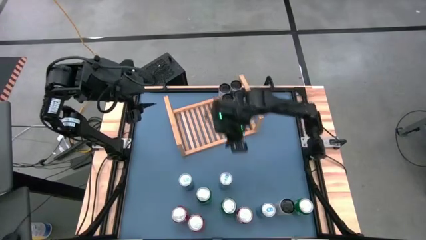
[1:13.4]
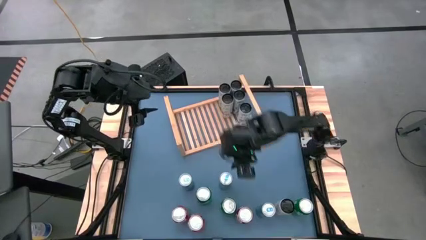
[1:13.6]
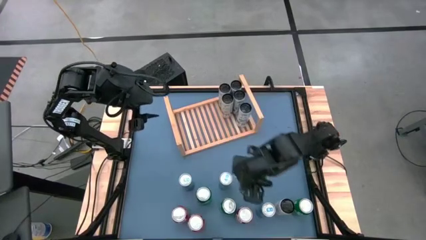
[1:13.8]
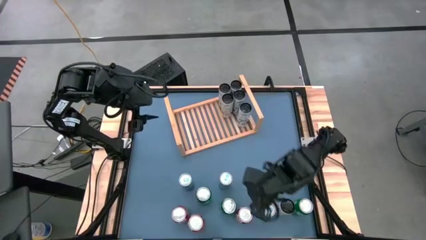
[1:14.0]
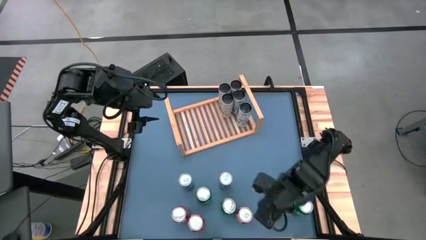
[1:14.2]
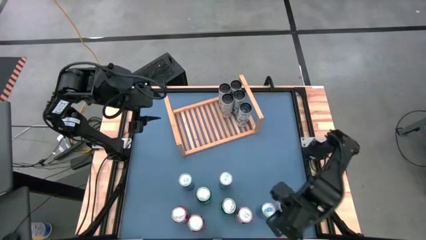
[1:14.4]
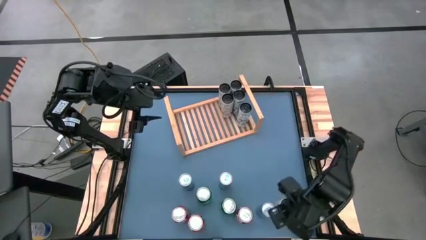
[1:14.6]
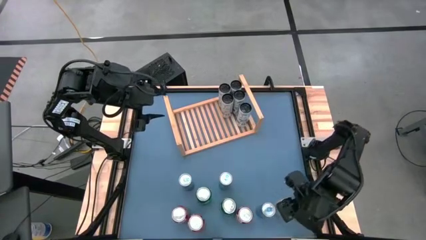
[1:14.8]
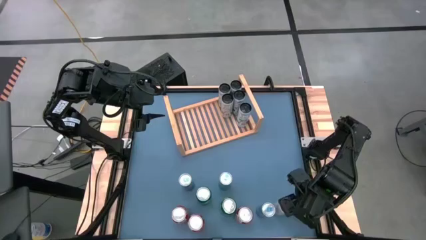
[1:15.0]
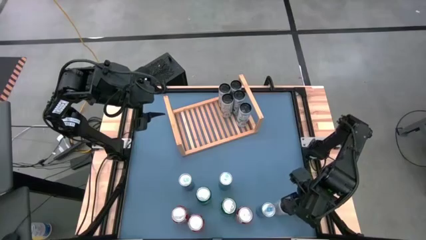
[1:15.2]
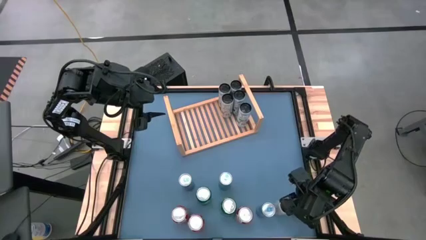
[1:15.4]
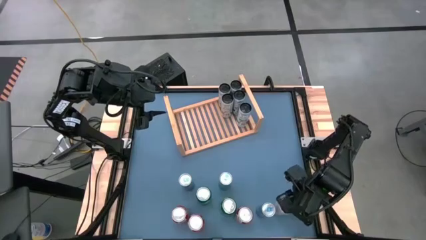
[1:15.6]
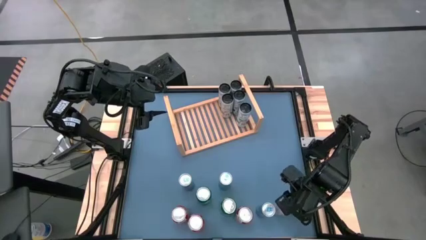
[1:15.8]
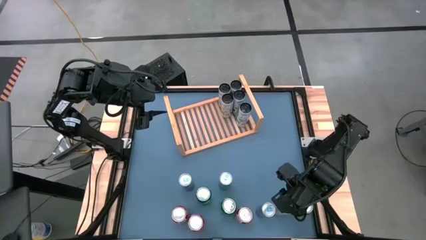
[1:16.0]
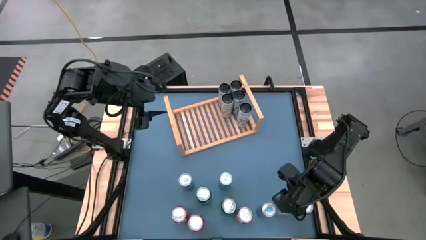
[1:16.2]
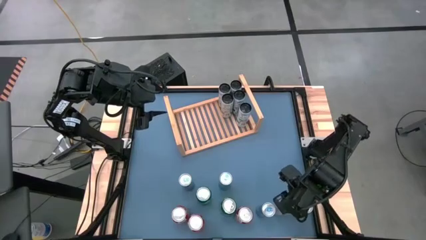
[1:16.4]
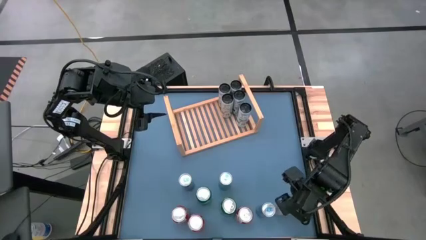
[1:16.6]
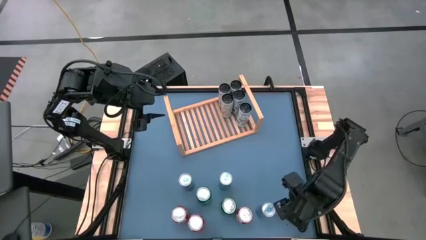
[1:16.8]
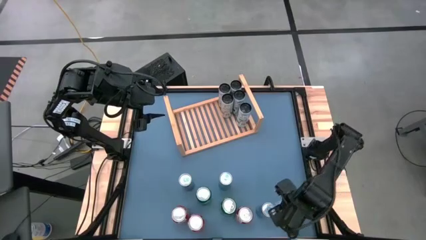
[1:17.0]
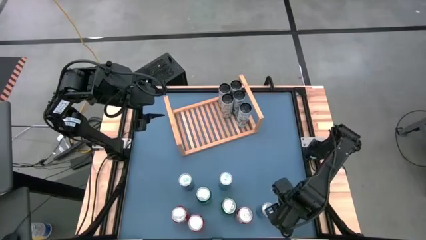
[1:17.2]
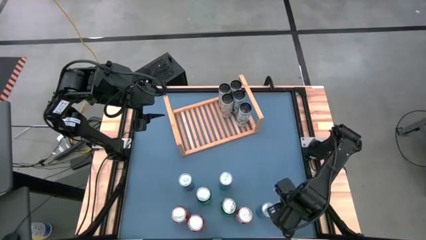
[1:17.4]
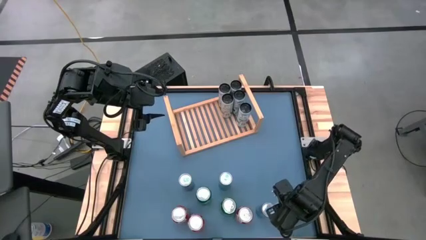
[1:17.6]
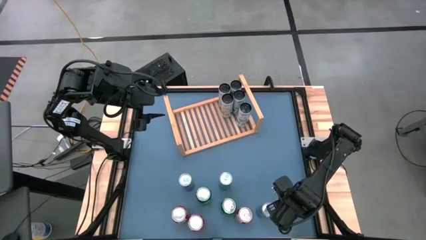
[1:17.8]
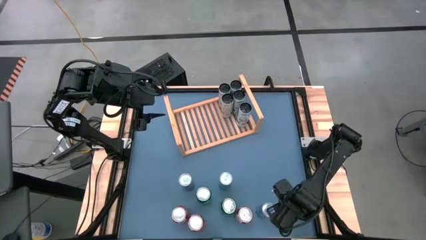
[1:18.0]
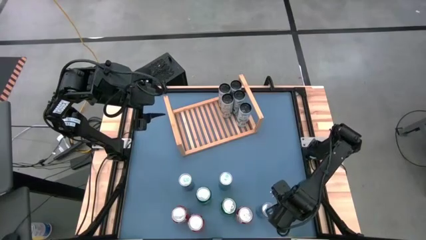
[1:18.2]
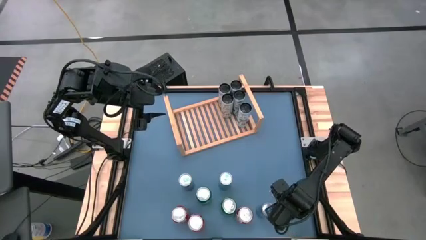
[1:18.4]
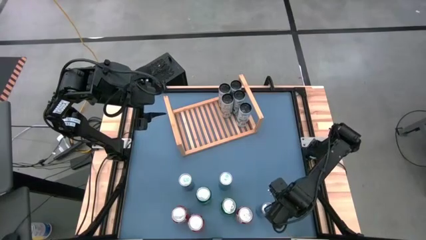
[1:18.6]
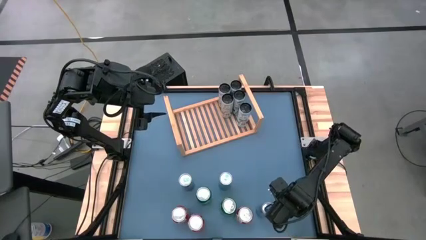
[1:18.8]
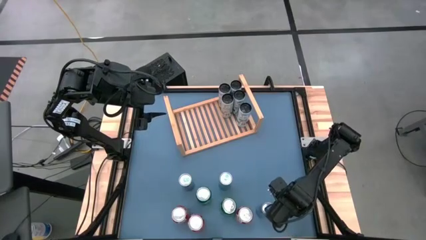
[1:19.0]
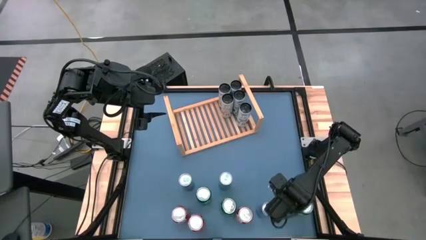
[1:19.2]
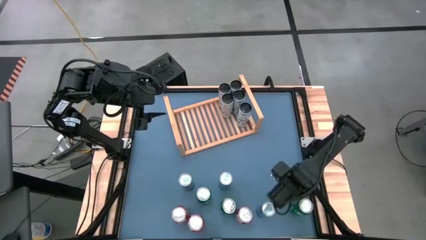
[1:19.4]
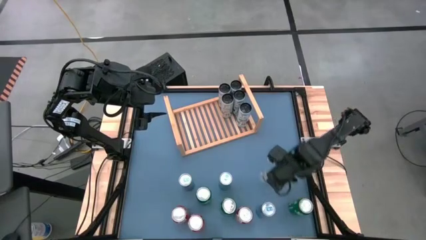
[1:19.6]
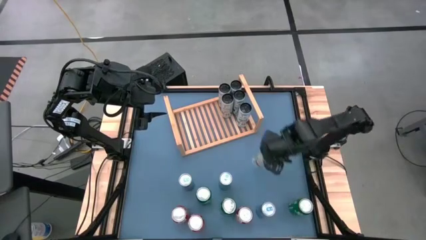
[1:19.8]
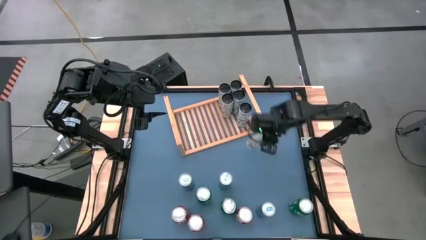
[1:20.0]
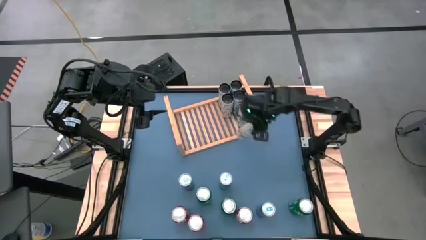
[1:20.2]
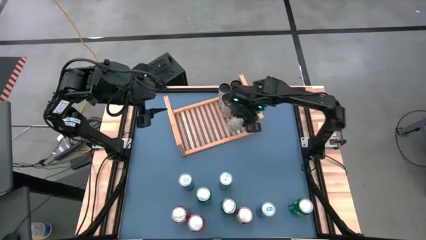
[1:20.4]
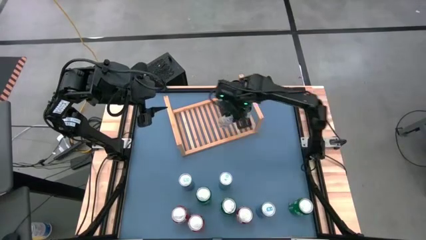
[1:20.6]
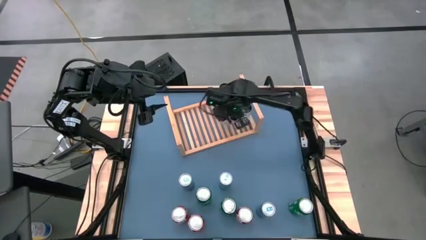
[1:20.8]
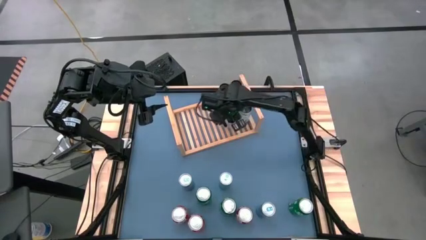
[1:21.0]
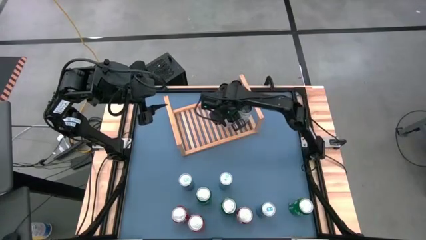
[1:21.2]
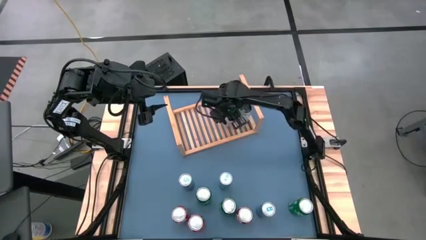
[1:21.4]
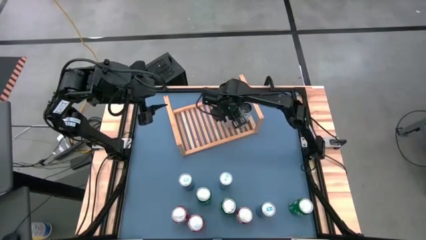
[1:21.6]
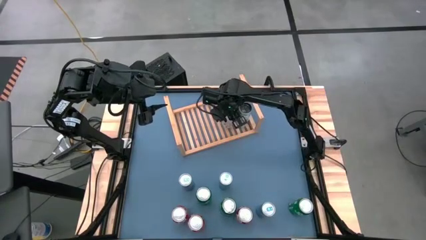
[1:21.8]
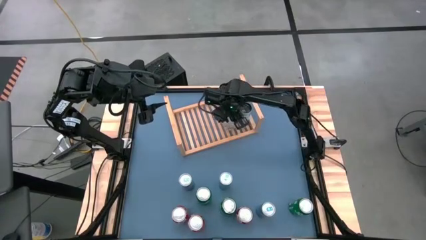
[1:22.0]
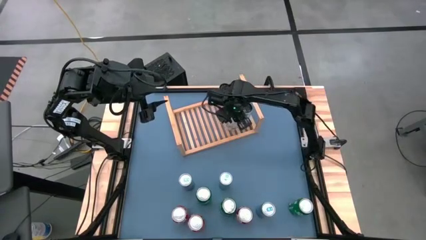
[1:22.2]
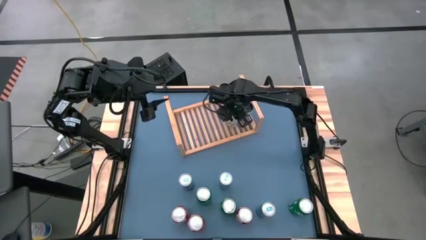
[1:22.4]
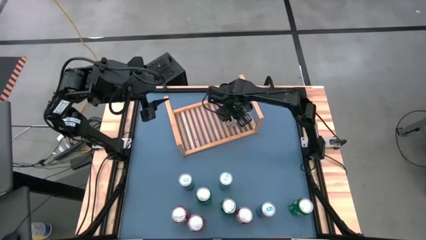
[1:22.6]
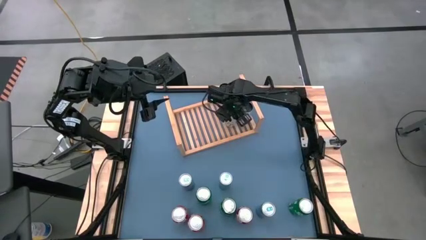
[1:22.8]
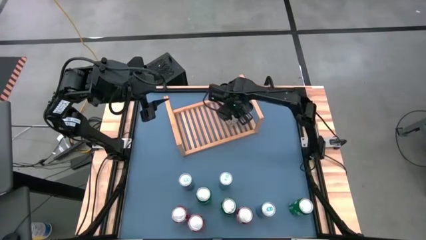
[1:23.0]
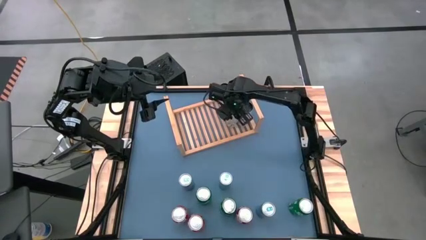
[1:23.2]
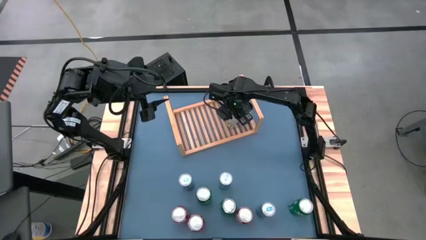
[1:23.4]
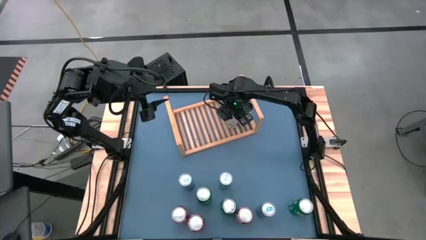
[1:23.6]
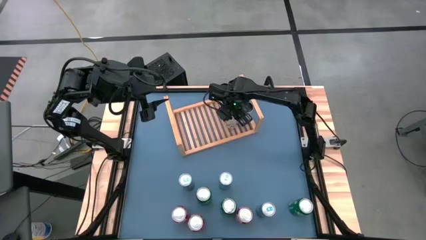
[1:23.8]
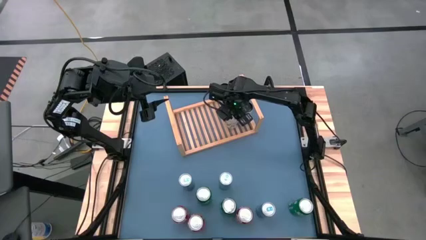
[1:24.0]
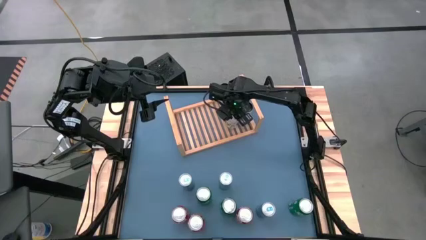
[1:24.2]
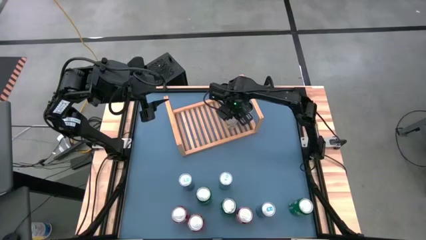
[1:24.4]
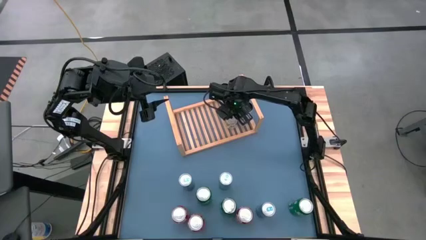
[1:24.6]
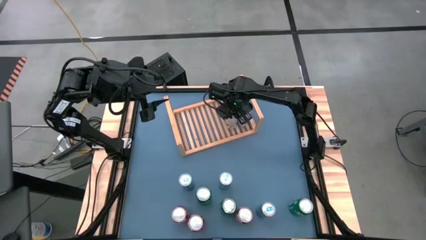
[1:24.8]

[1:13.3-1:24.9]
Task: Place canned beverage on shelf
Put the white-yellow soda can on the shelf aligned with the other white-yellow soda cans

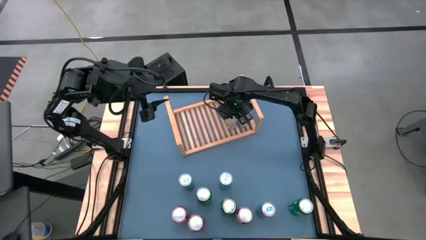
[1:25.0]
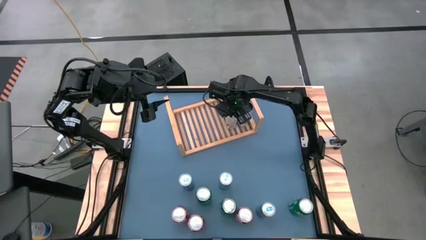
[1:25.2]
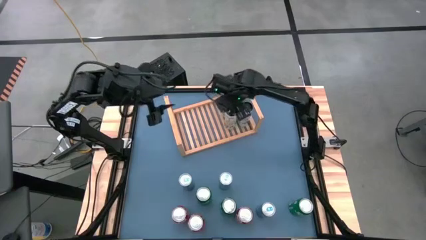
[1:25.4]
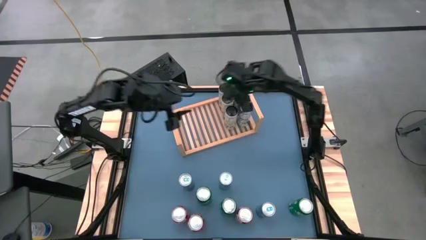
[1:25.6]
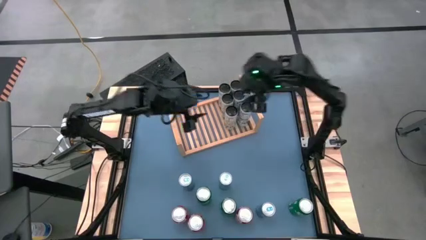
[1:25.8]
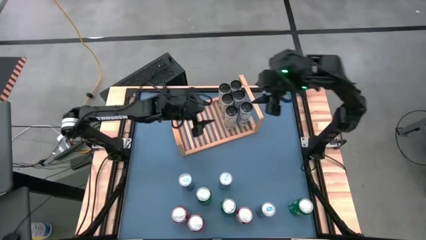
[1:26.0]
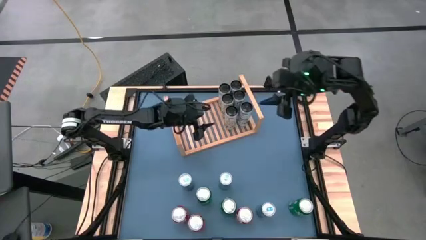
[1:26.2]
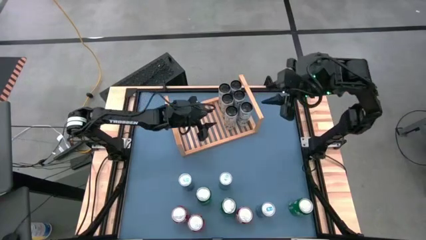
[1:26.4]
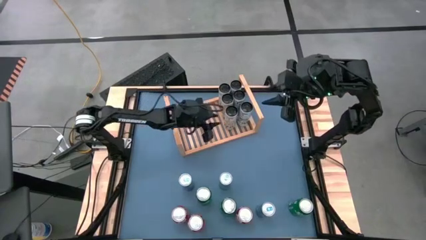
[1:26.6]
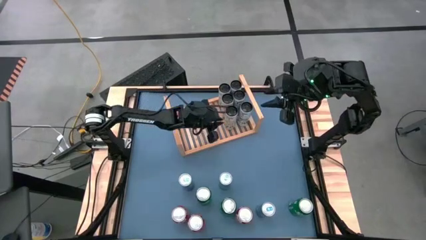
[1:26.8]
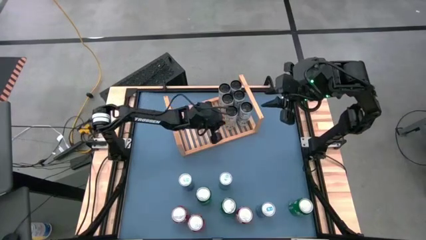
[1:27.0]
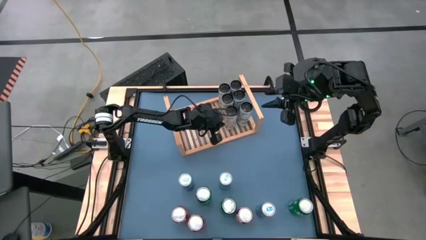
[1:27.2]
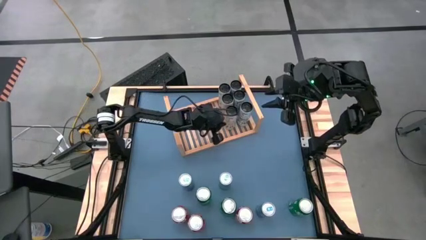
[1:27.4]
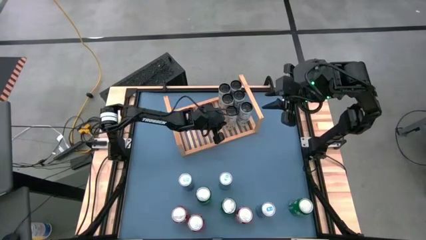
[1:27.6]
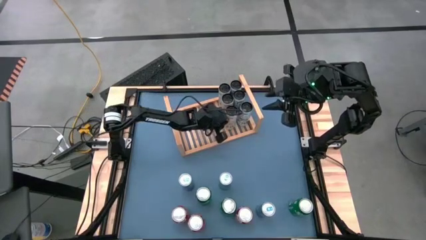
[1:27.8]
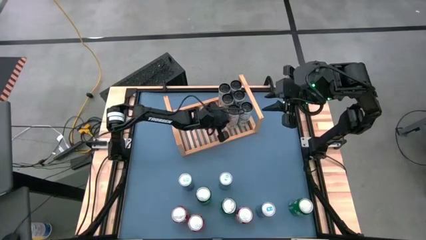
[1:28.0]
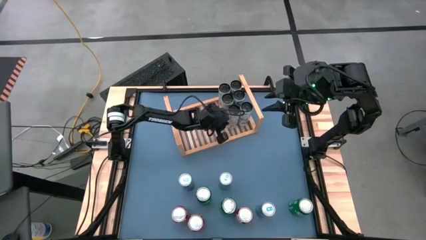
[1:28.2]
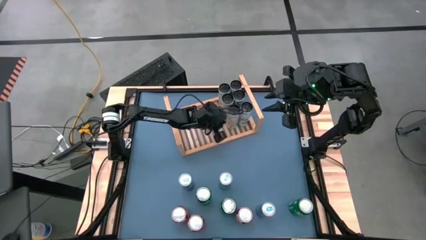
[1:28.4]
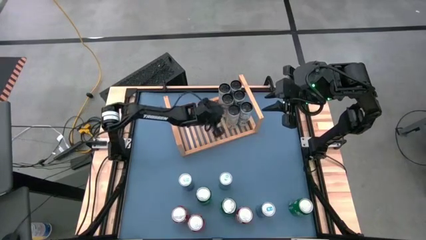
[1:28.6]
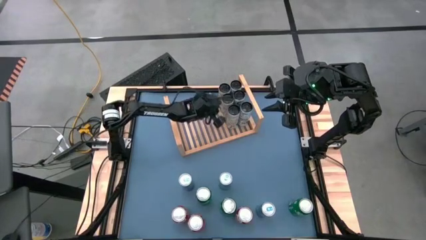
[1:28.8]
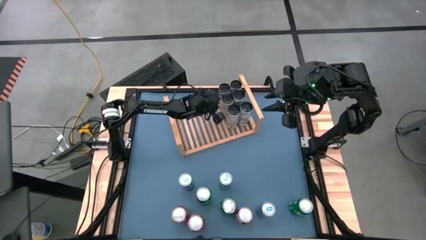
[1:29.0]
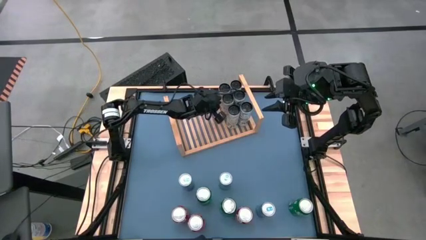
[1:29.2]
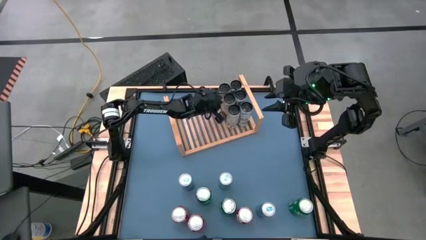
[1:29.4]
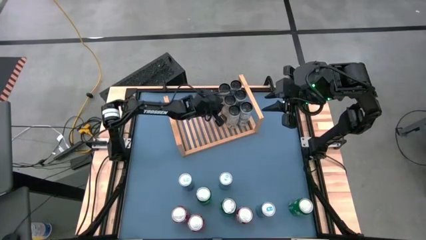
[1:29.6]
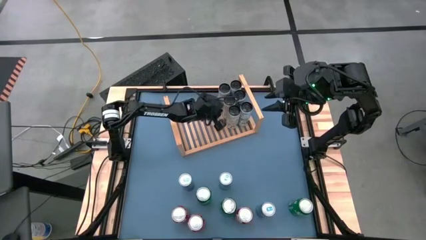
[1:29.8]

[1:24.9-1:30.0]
Adjust the white-yellow soda cans
